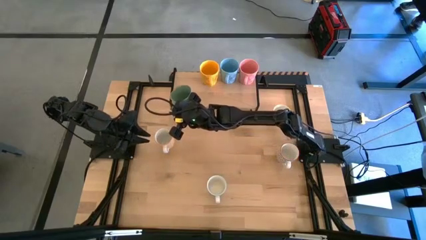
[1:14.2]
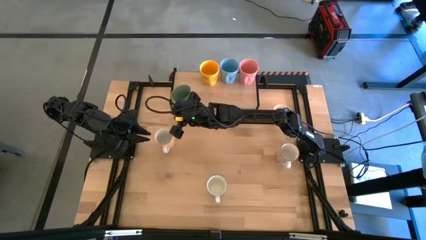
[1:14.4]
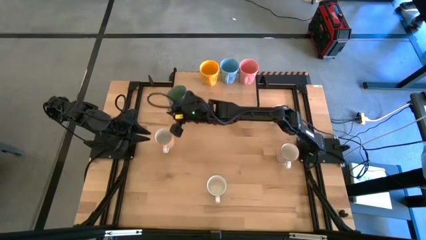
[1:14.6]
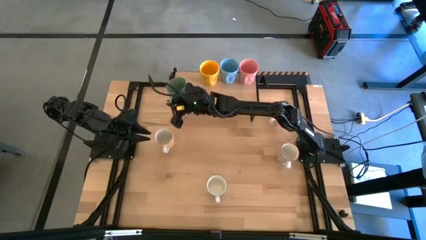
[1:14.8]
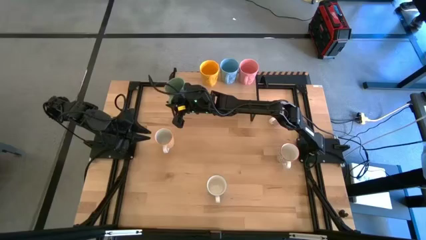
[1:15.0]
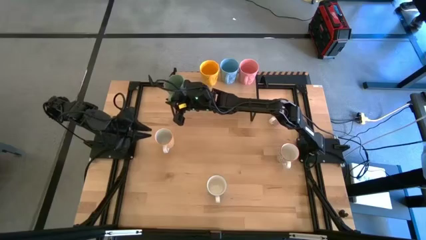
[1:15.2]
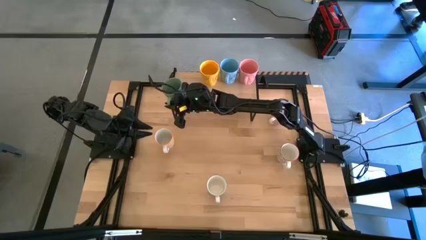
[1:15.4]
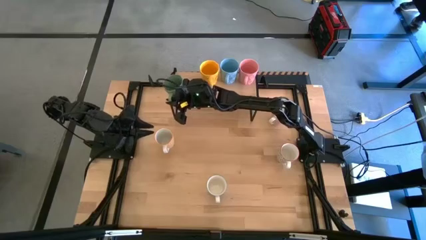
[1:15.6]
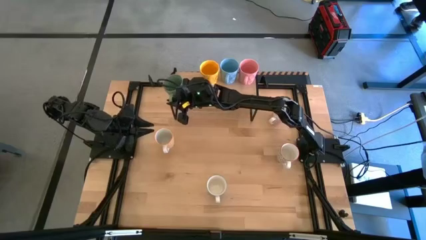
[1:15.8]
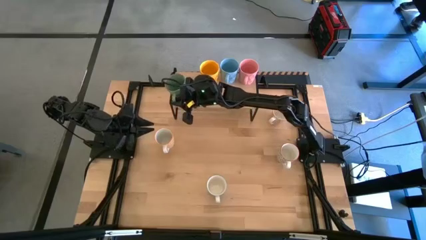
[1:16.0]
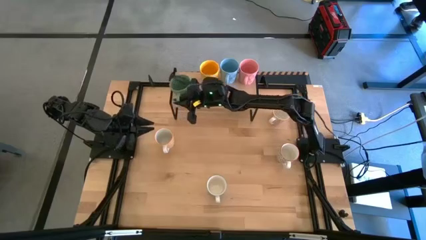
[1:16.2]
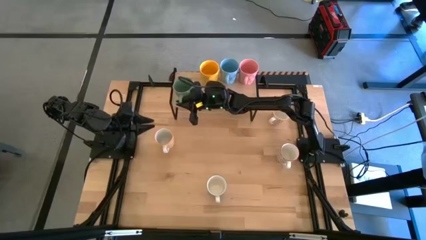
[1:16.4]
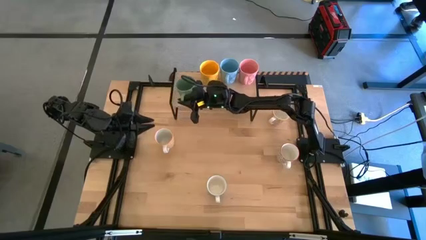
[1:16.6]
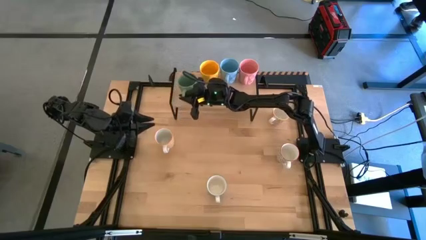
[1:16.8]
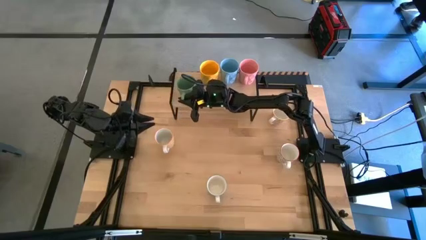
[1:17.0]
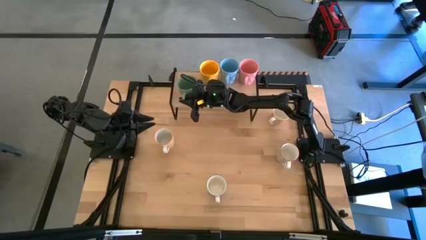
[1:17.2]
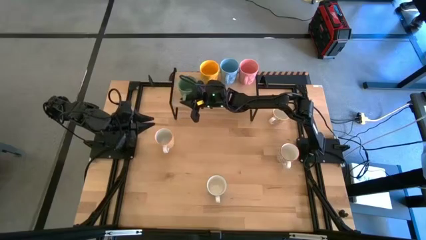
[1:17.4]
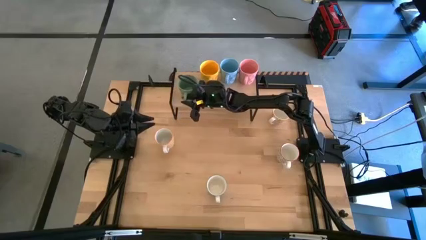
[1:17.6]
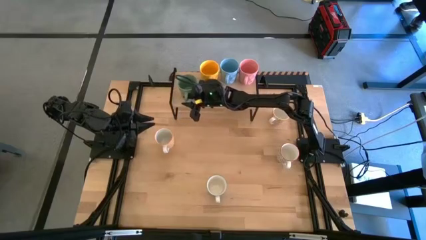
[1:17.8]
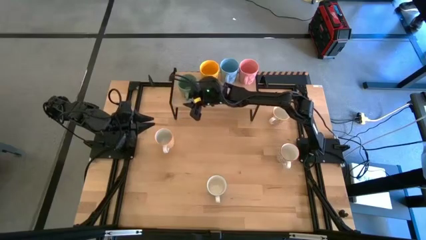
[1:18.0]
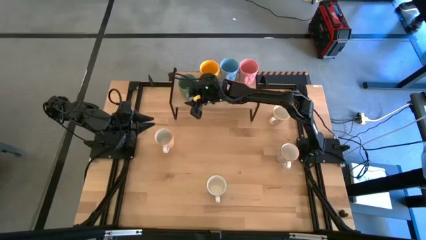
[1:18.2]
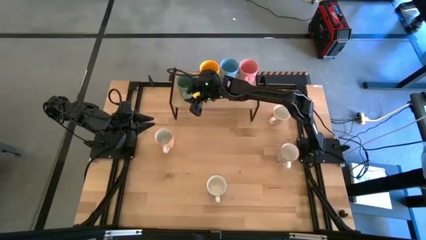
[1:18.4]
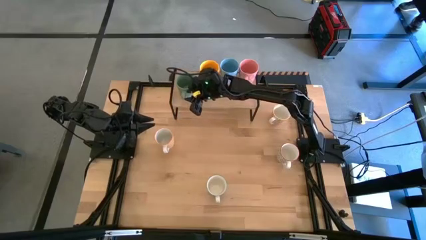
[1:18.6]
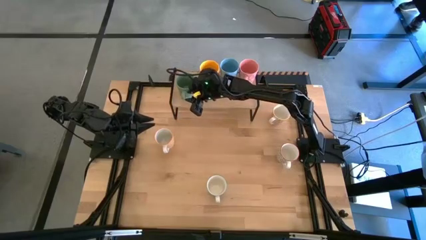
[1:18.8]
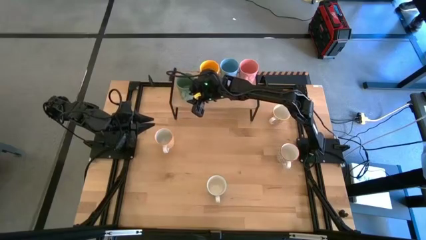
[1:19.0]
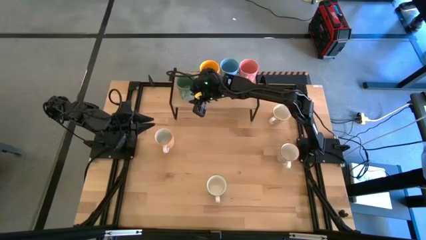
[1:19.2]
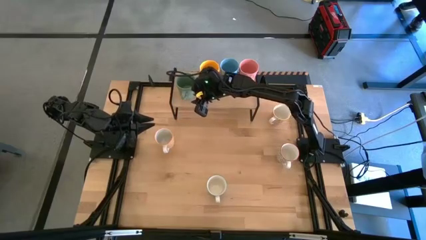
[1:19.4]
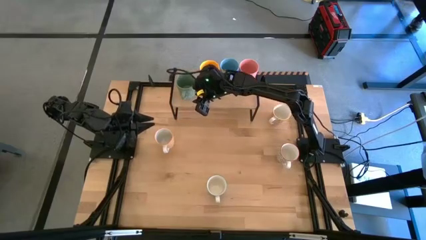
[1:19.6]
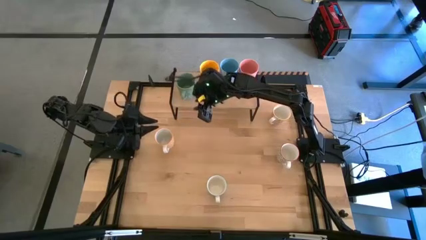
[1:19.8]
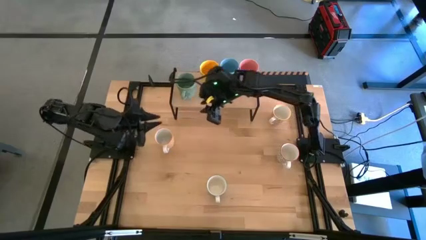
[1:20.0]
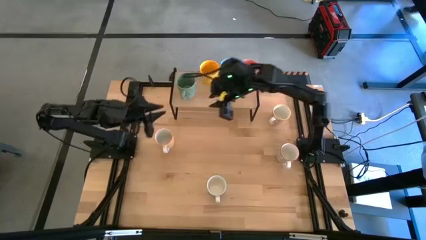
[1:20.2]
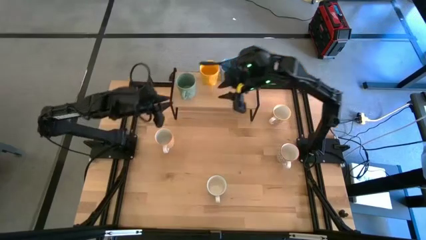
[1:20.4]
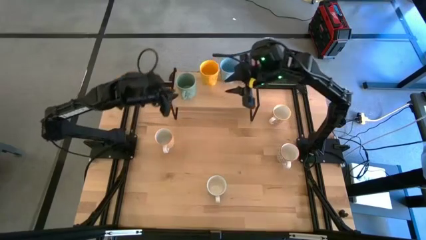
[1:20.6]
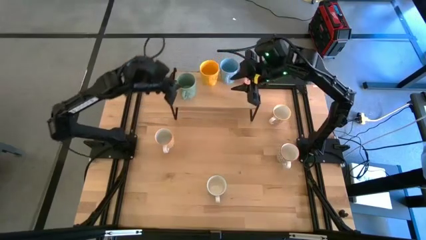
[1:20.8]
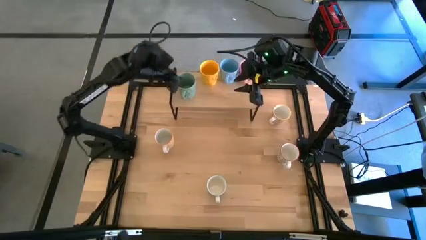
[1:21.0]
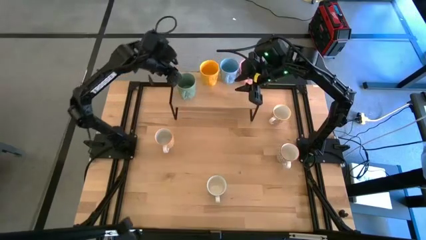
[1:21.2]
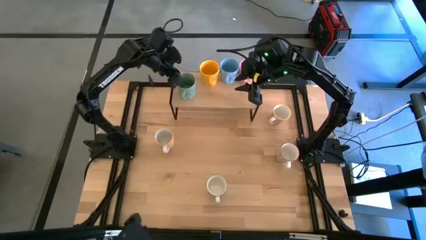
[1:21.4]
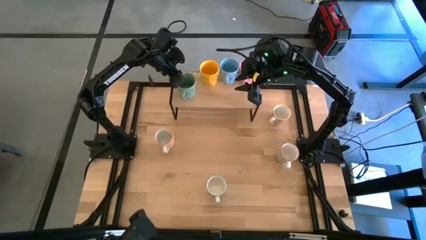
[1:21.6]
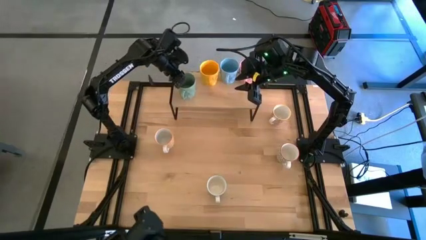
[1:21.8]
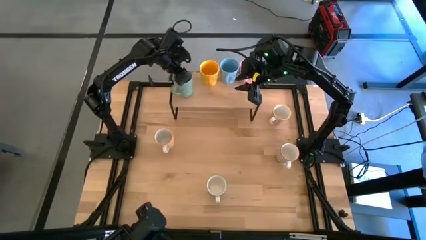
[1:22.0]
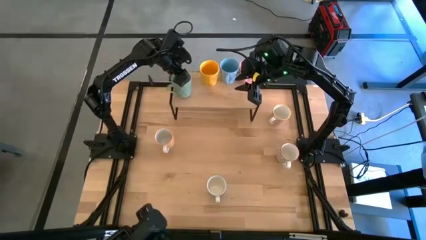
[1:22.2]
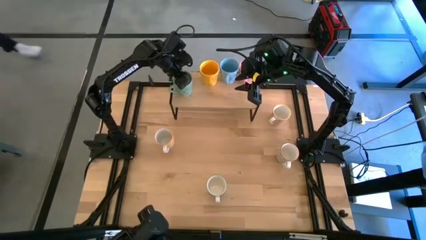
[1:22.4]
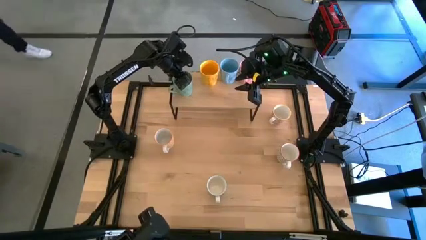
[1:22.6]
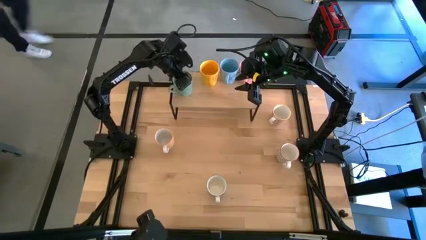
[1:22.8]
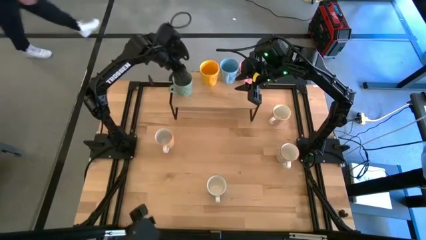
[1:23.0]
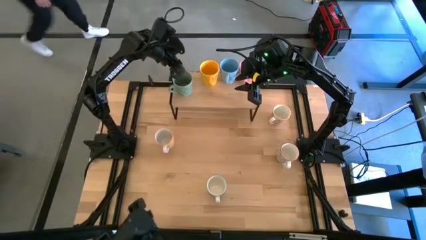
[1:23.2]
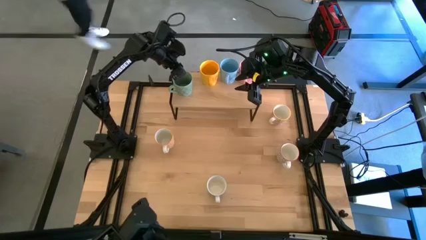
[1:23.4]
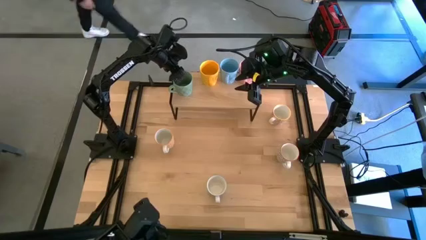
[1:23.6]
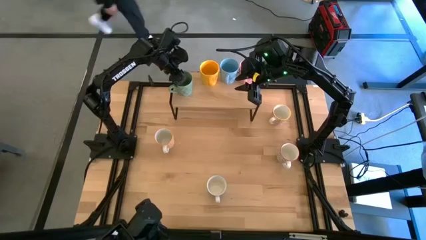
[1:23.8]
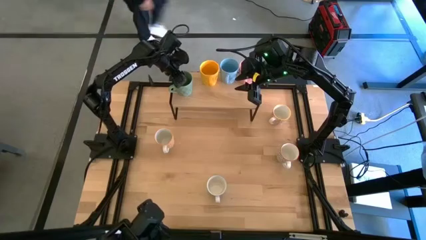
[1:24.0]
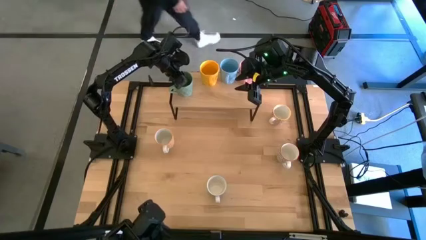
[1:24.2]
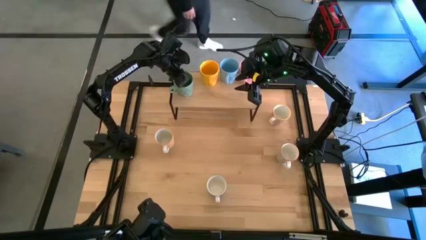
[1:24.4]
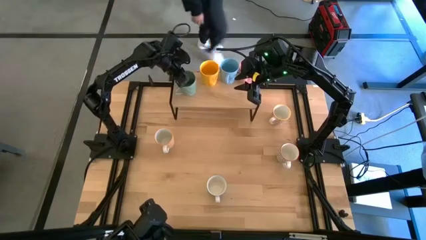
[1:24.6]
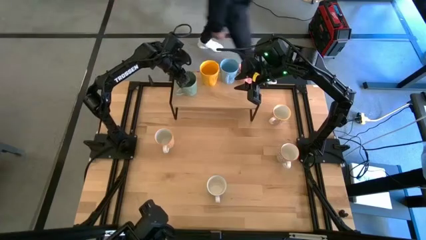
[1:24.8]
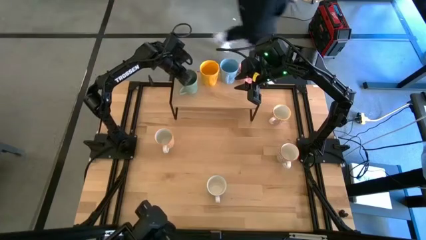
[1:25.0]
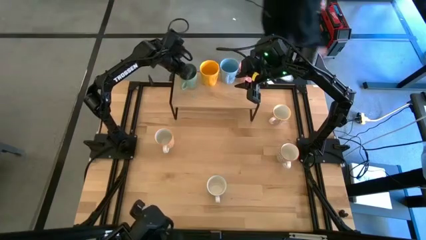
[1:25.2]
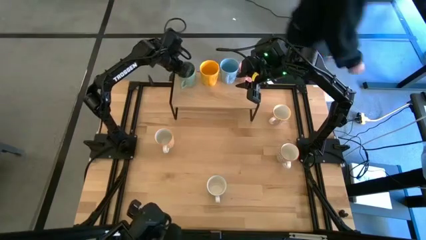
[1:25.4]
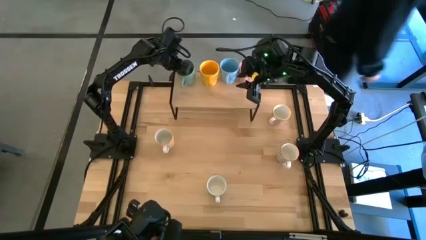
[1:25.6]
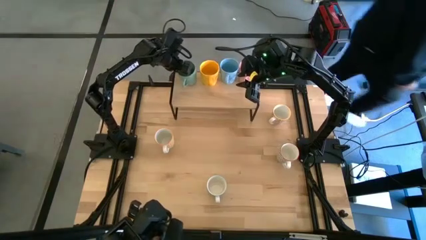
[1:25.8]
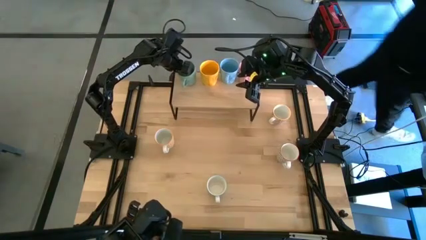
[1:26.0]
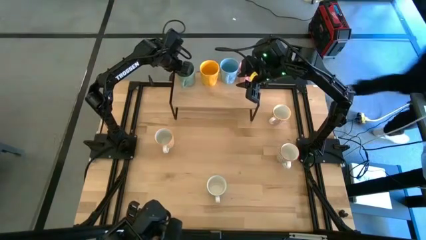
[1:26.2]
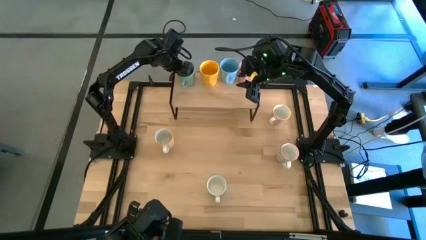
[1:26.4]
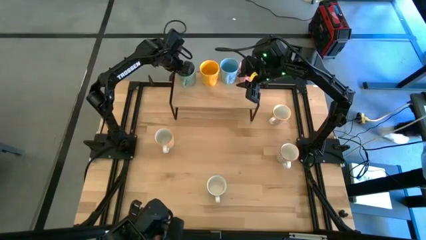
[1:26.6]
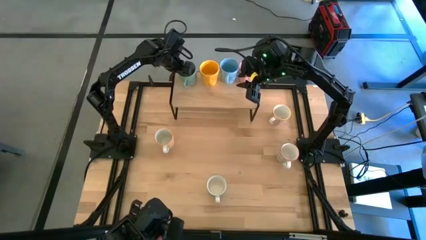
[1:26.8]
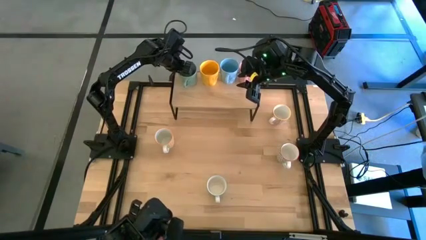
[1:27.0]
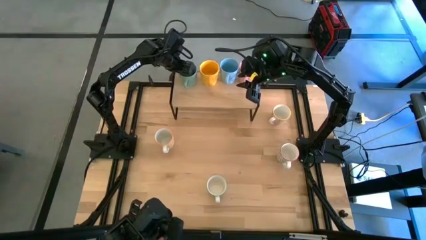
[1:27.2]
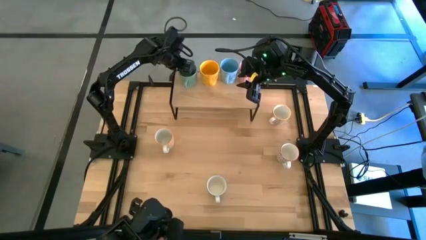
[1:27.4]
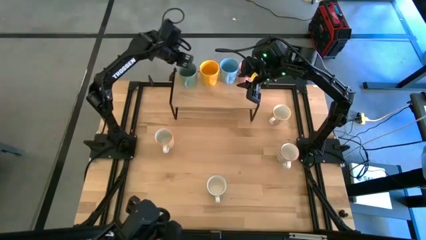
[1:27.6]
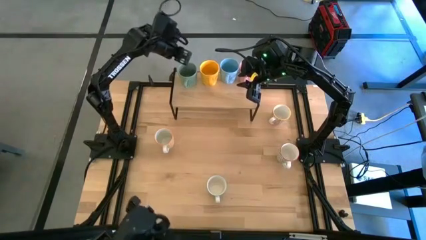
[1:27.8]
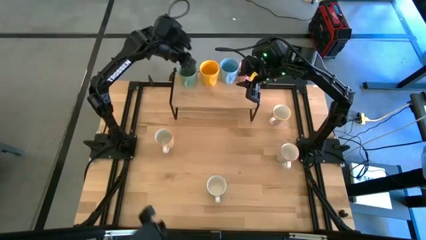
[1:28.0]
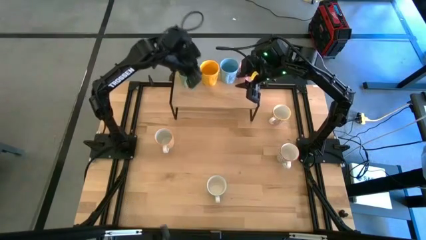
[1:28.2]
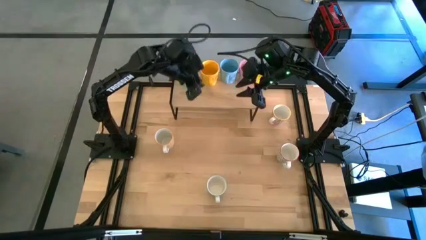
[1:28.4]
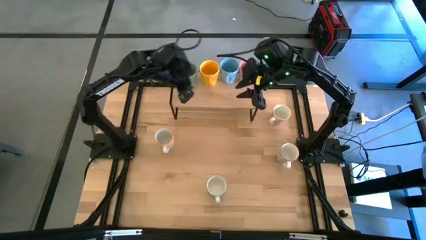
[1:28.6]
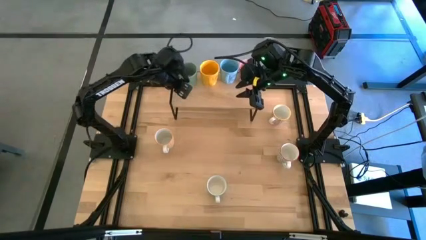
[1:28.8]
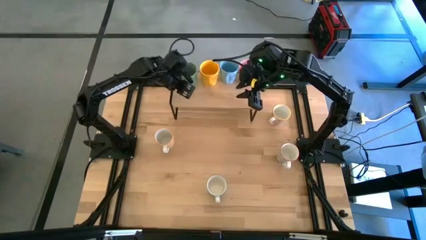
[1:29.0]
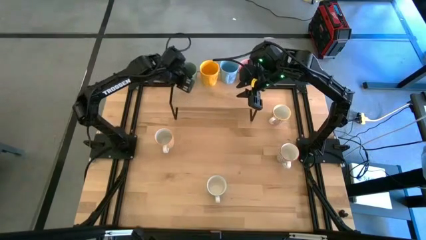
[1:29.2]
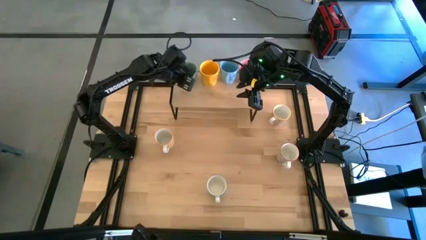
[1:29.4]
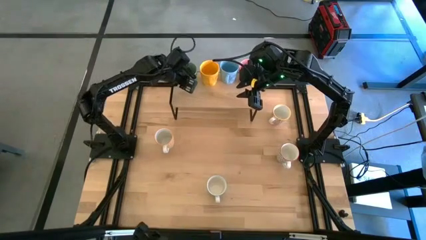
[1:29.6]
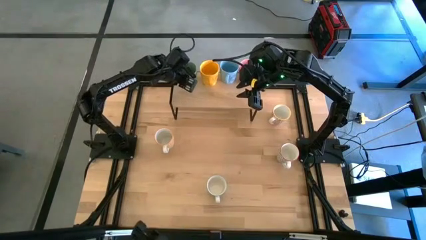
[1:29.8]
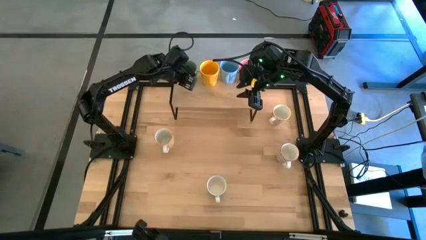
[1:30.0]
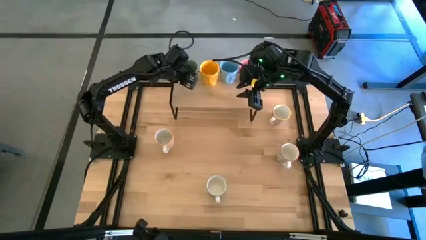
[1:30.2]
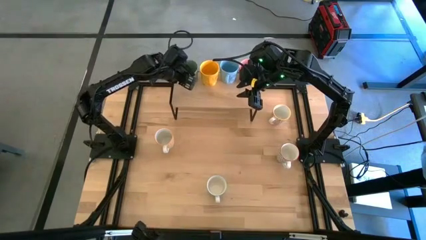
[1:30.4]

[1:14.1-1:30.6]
Task: Place coffee mugs
Put the green mug on the shelf
